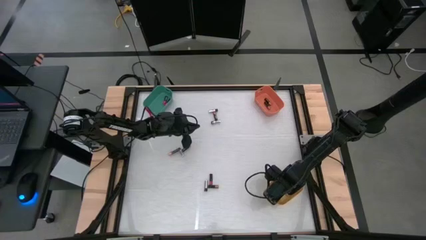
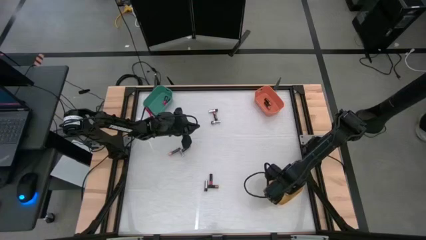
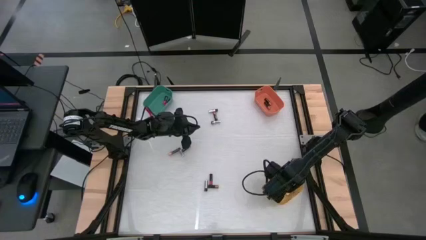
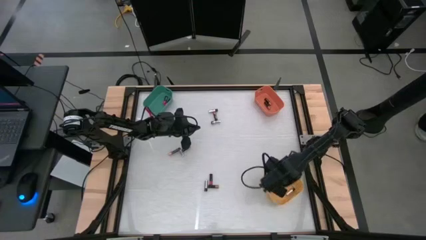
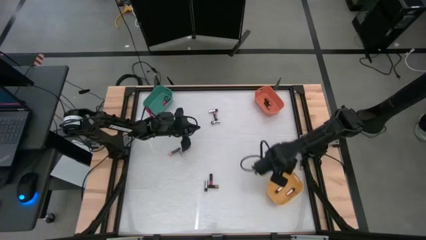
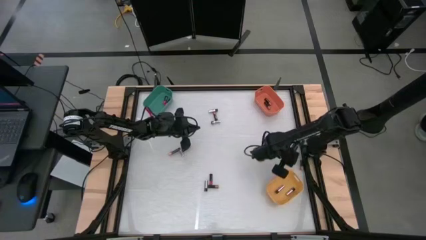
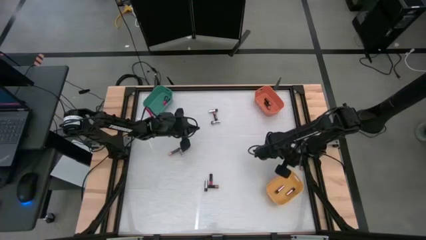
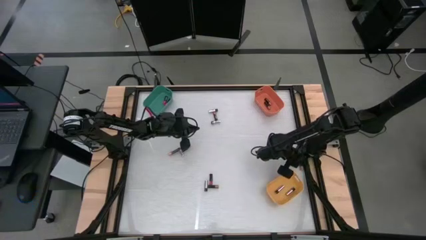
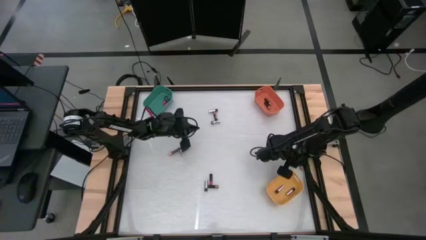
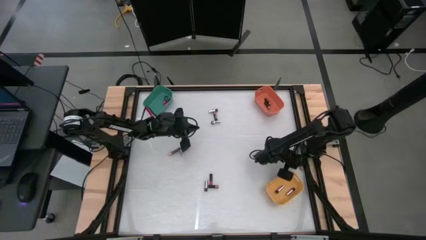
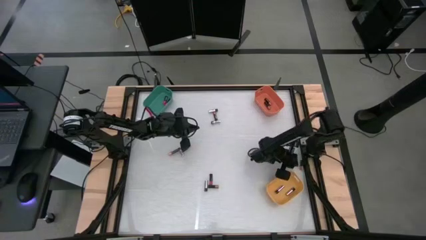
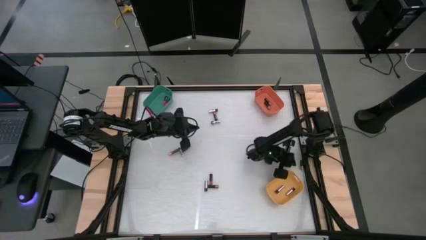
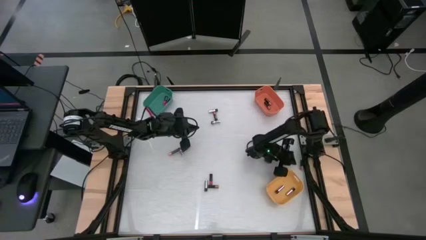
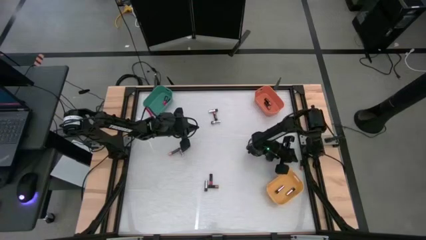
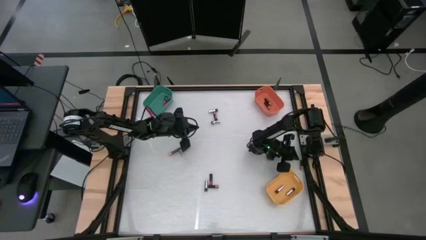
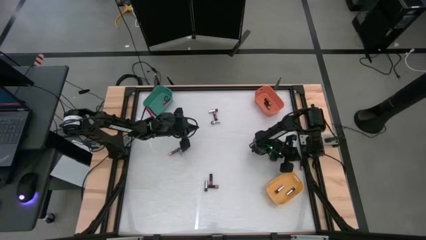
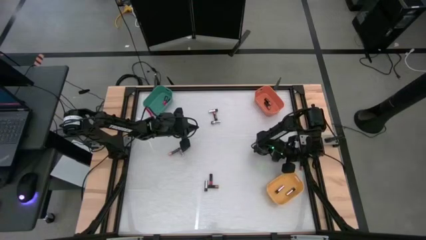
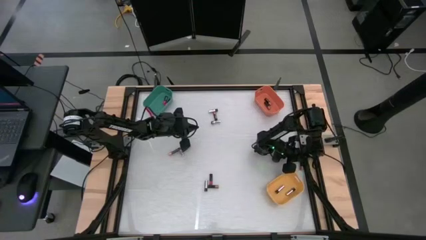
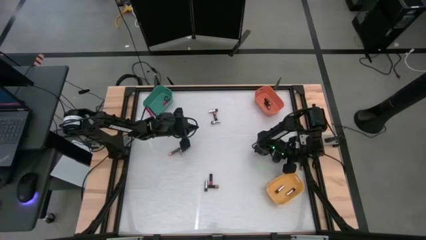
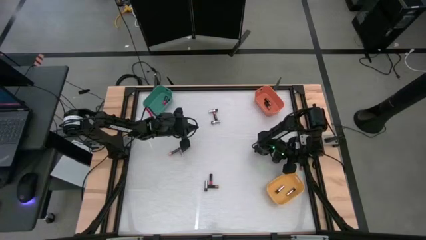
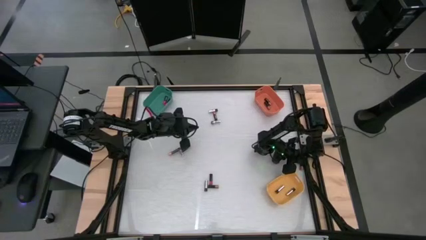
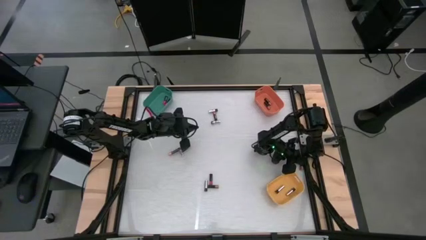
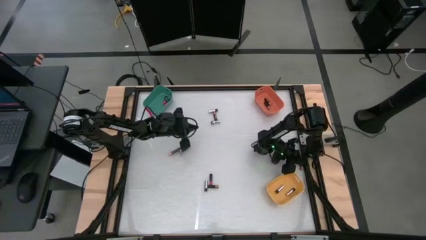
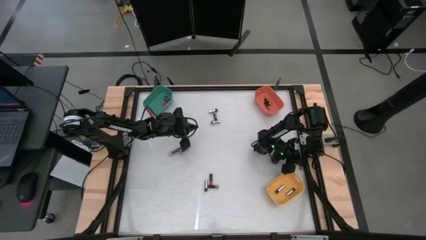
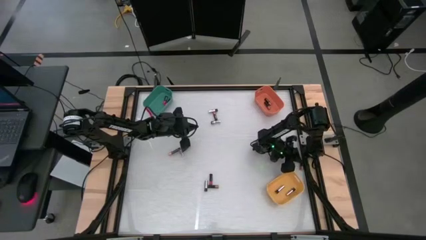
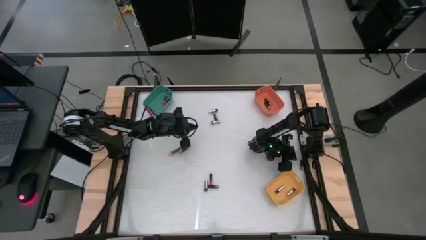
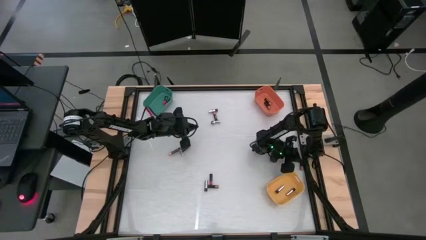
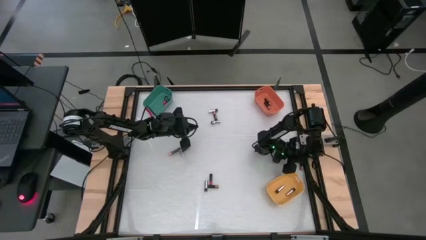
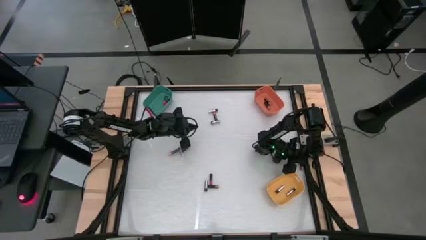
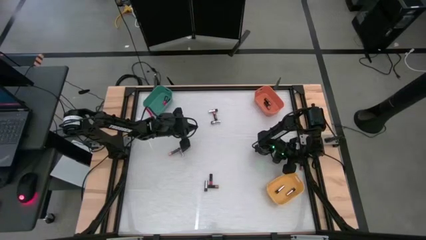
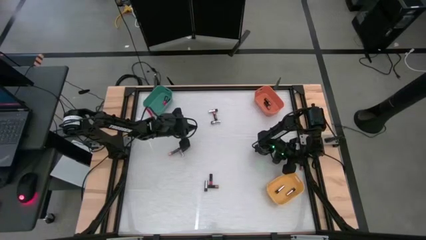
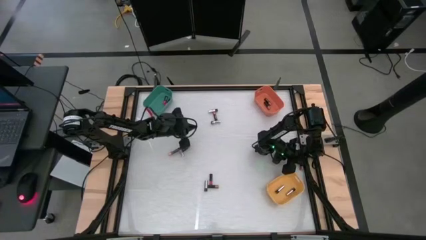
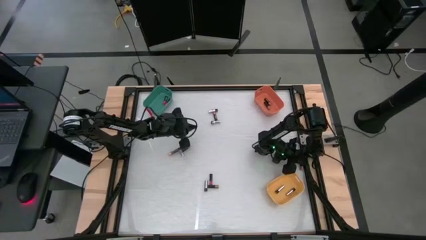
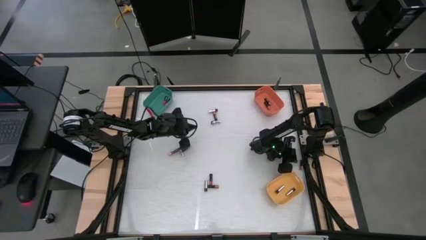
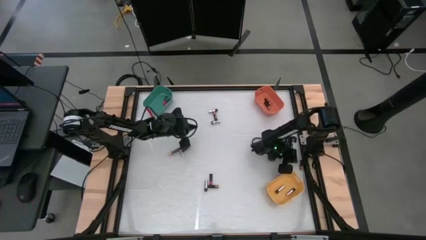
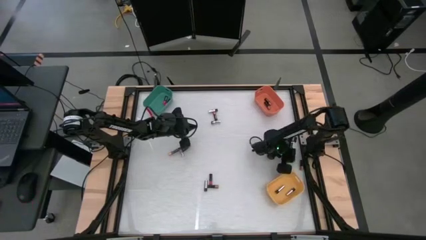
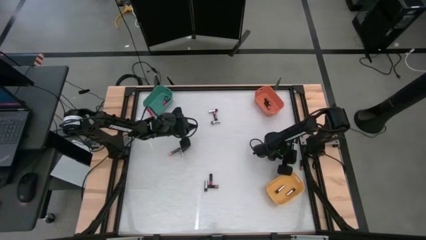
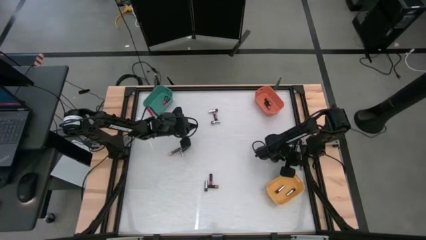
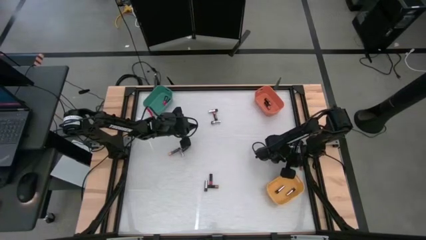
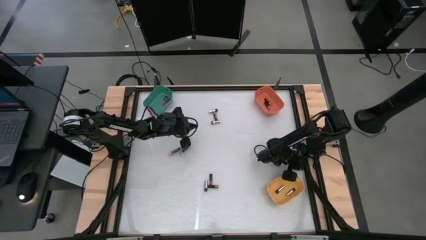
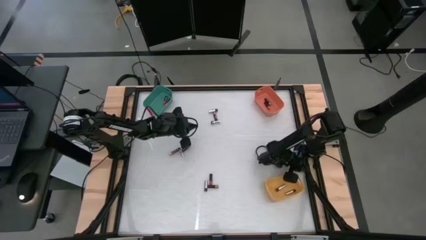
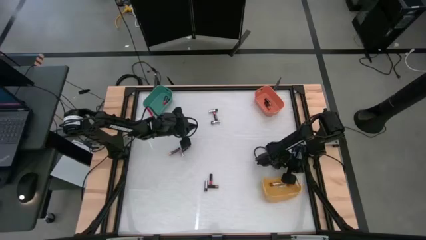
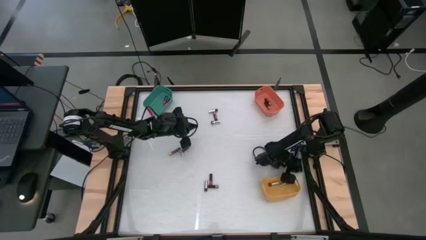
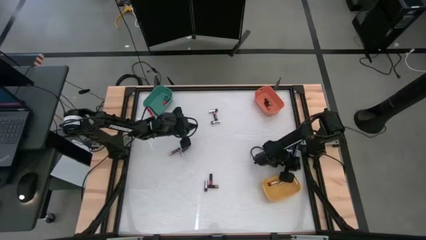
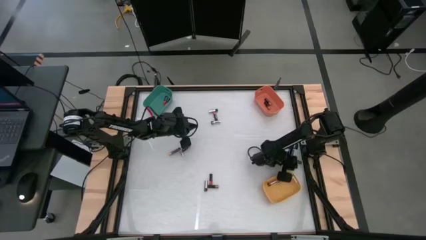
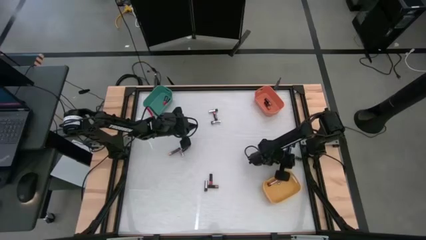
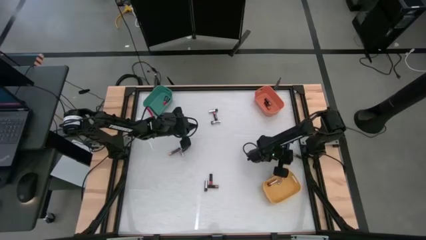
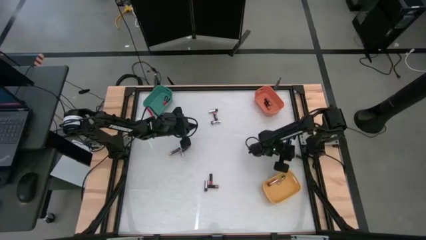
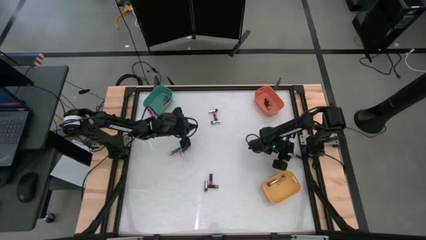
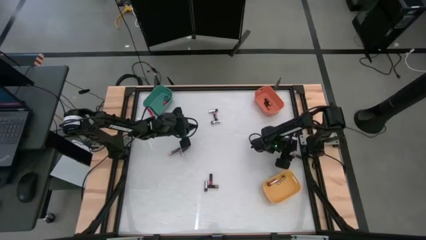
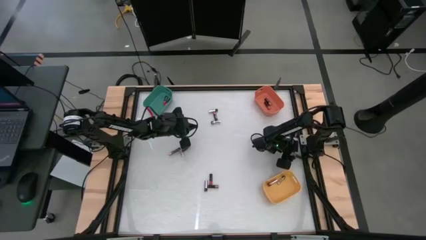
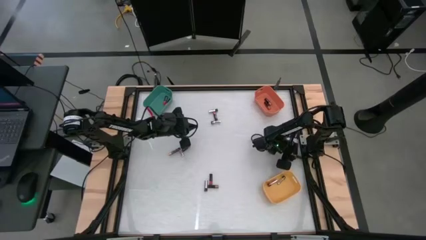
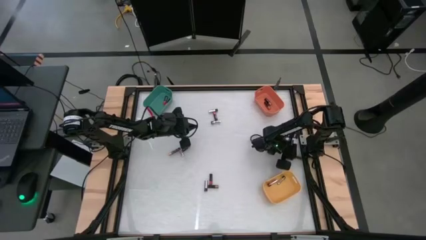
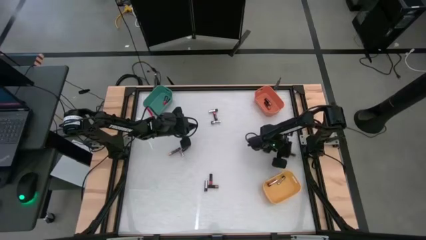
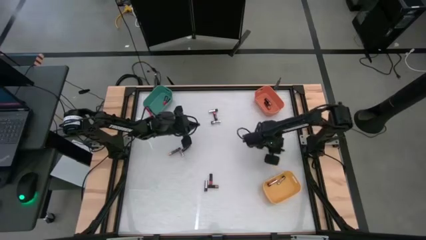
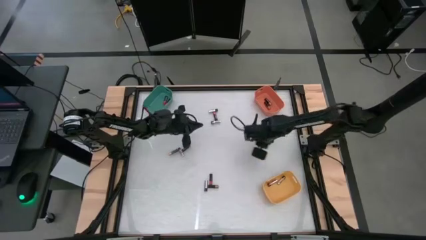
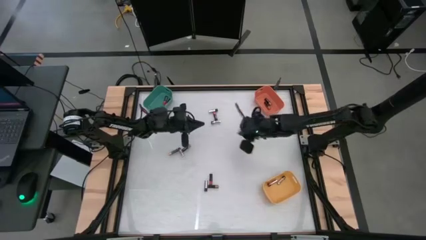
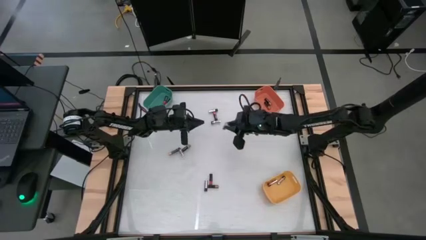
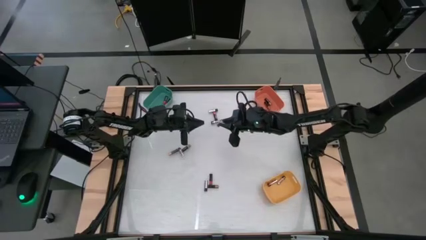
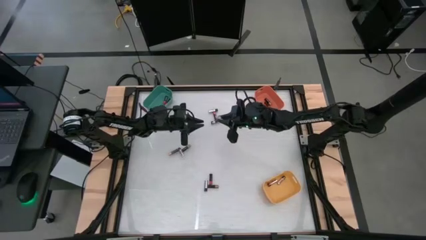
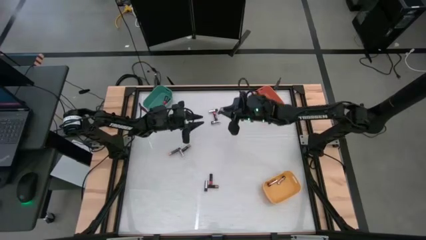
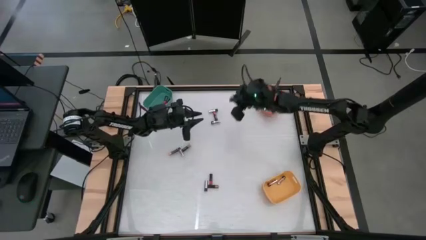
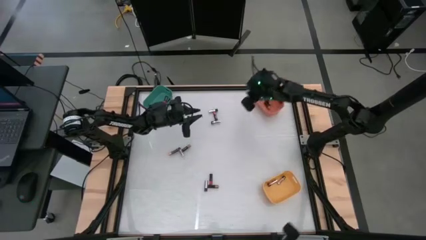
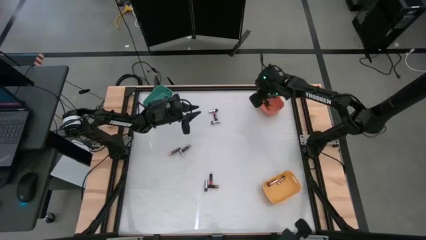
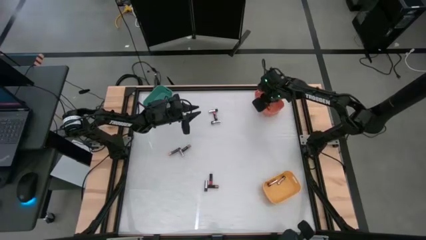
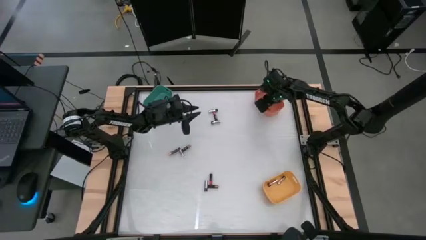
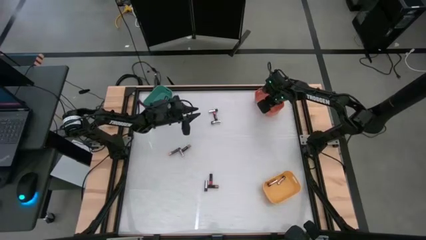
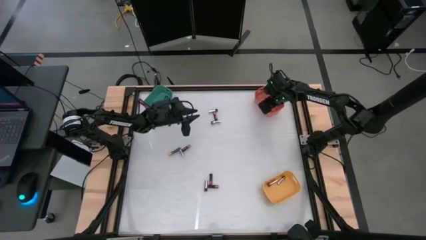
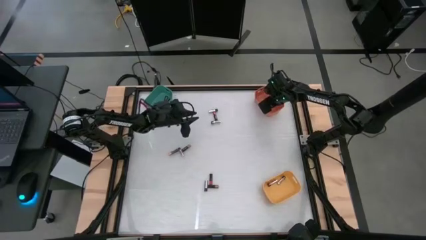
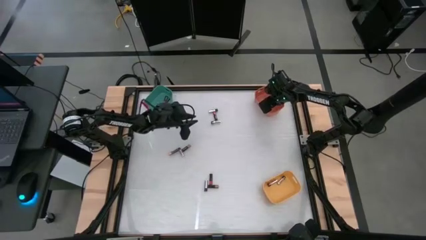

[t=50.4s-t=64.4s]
Task: Sort batteries
Put the black battery into the orange bin

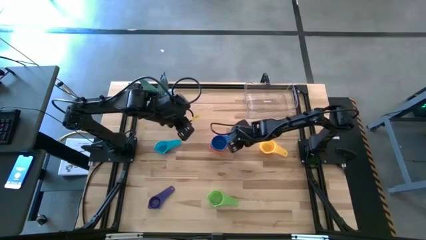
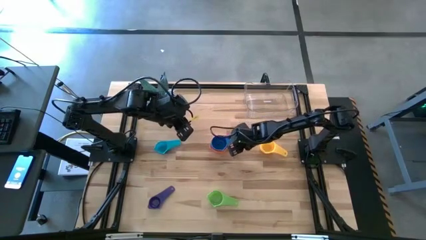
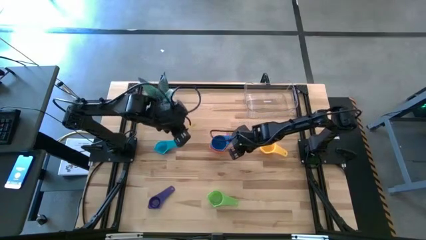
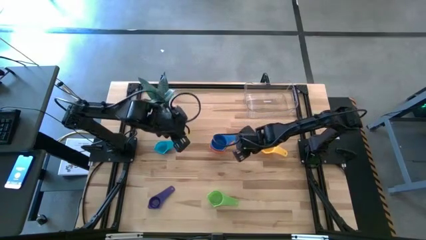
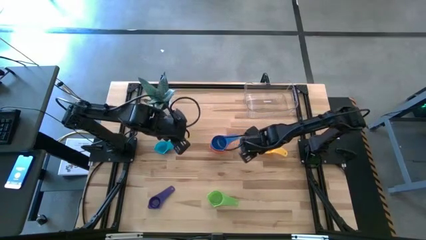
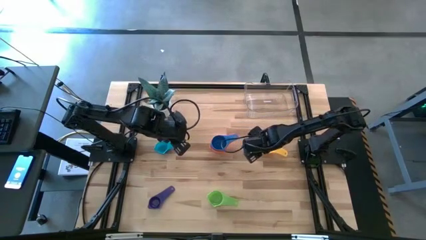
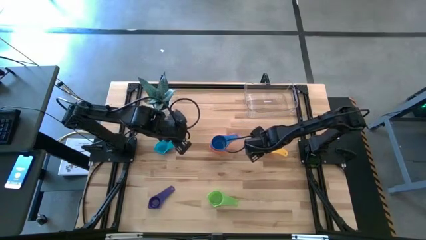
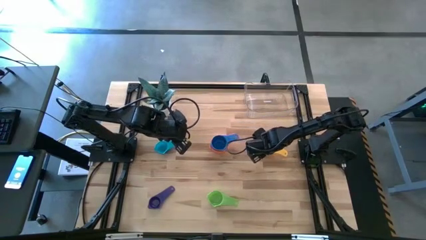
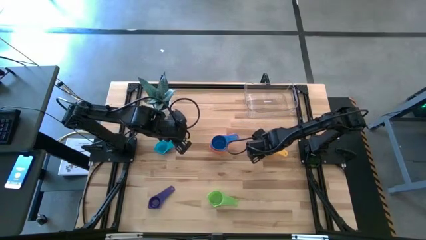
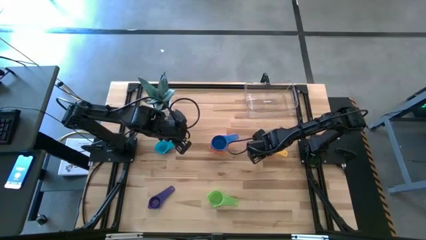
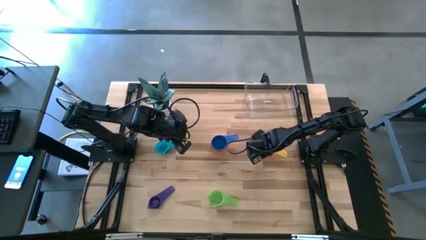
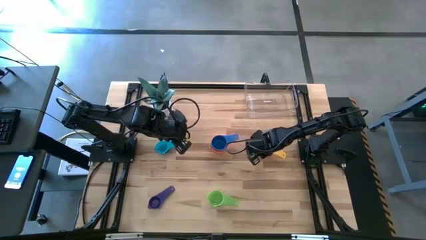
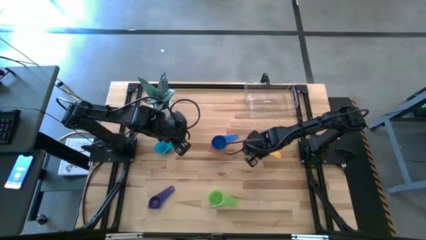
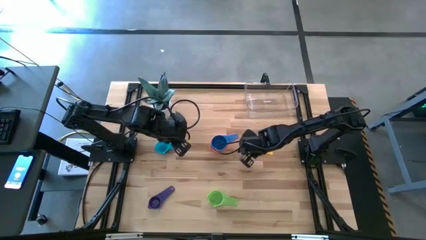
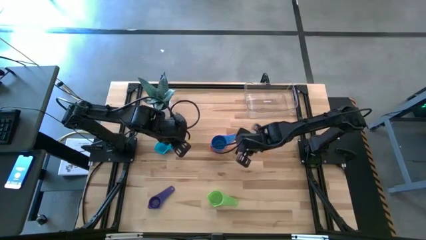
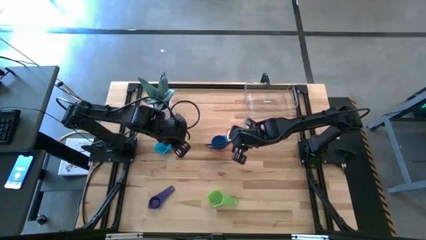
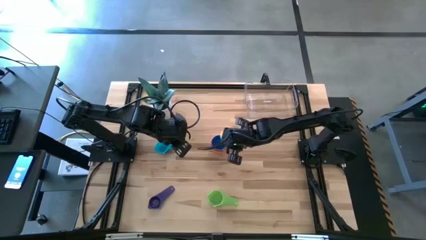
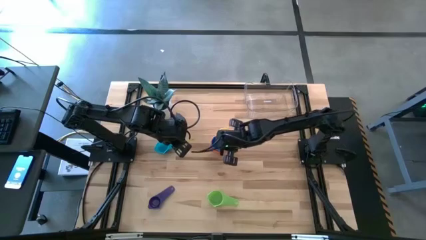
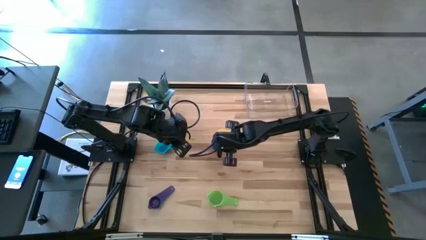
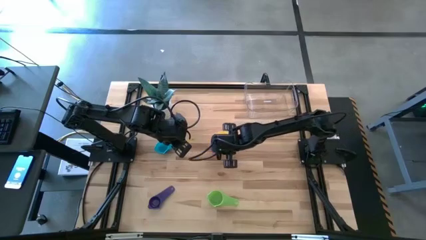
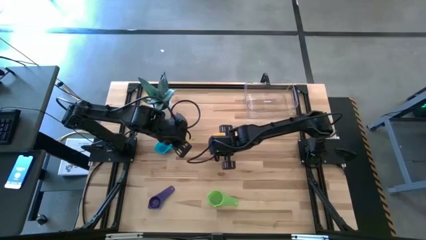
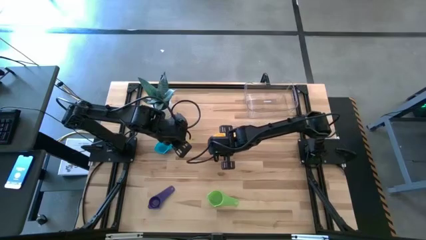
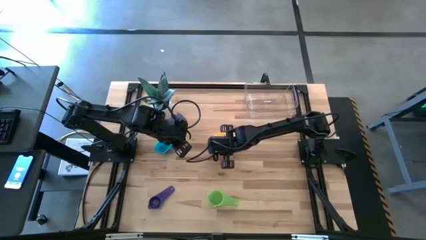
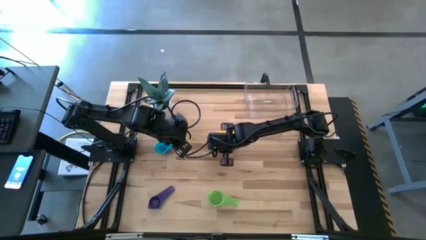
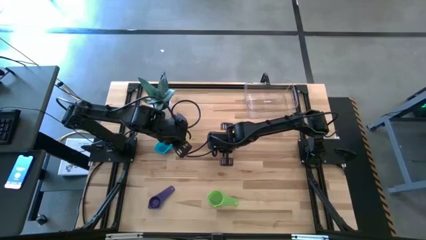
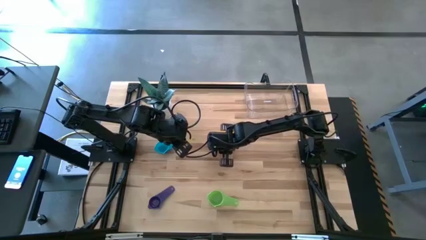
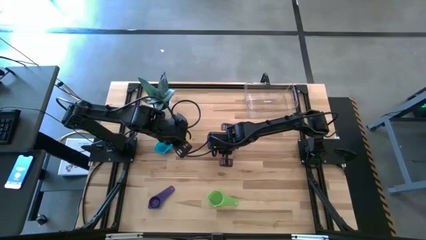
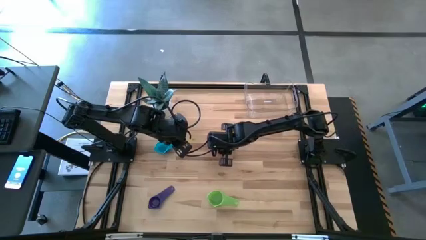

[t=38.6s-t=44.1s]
Task: Nest measuring cups in basket
Stack the yellow measuring cup on top the dark blue measuring cup
